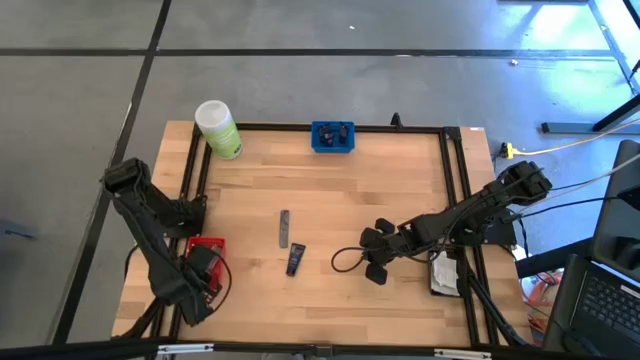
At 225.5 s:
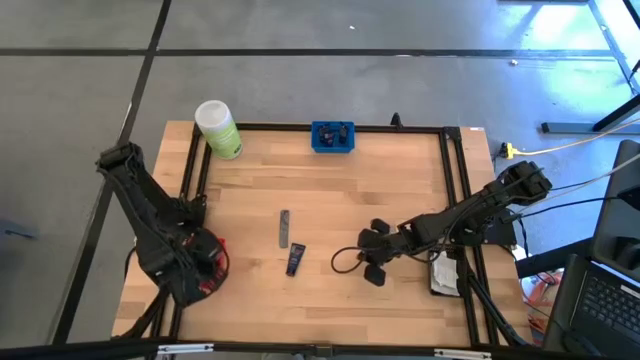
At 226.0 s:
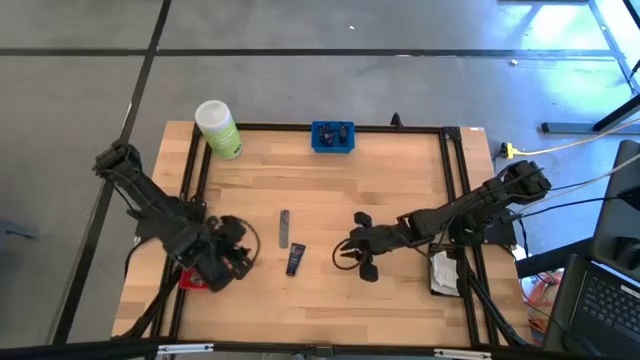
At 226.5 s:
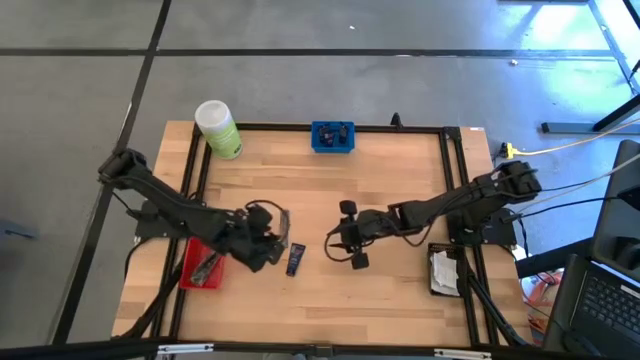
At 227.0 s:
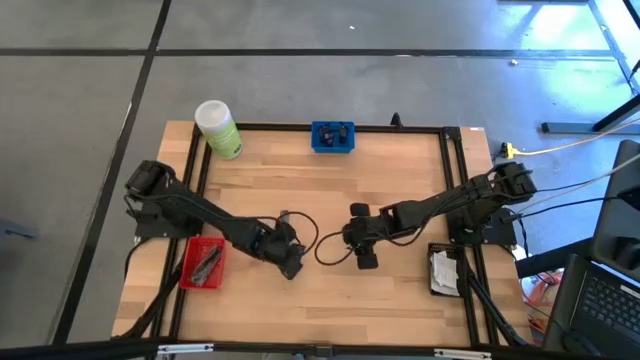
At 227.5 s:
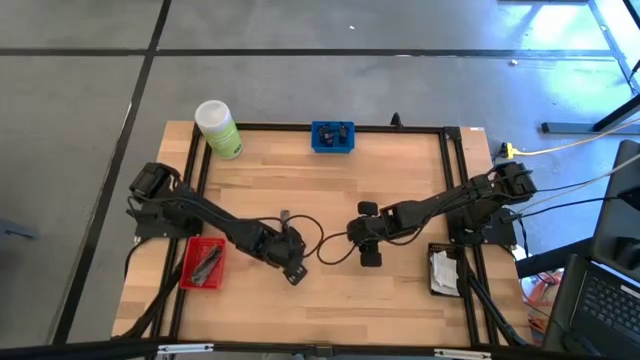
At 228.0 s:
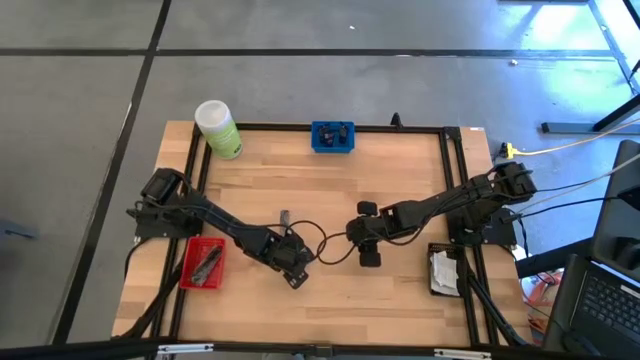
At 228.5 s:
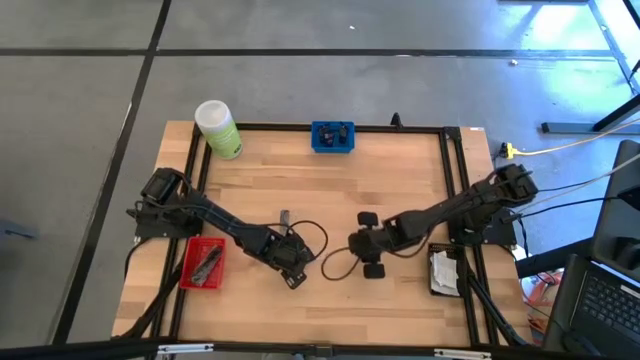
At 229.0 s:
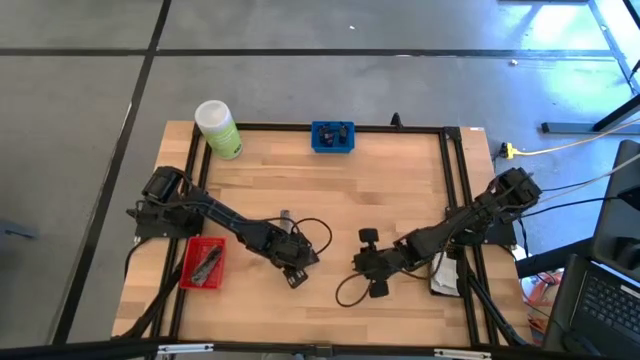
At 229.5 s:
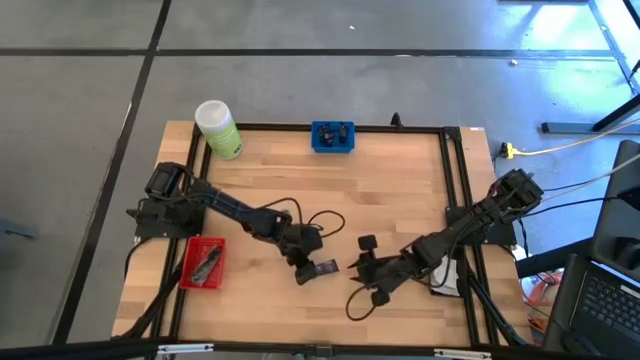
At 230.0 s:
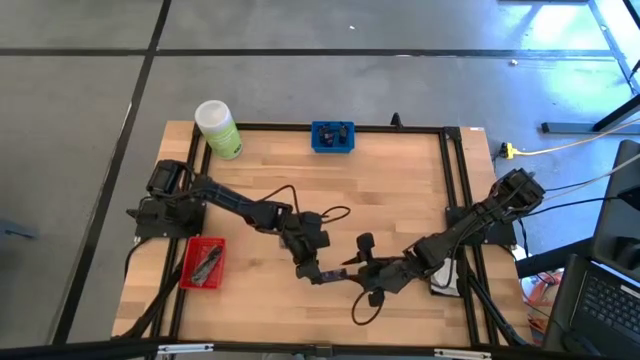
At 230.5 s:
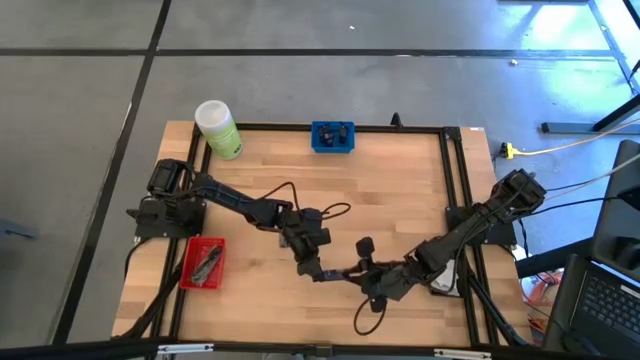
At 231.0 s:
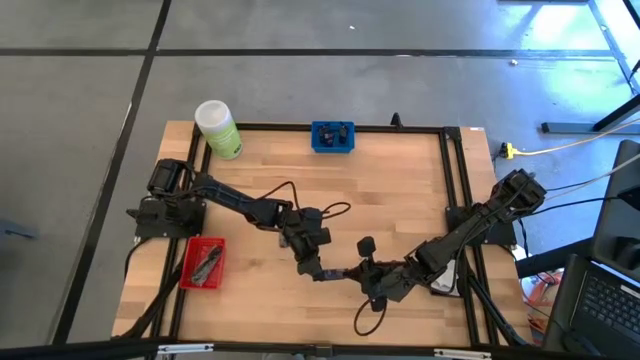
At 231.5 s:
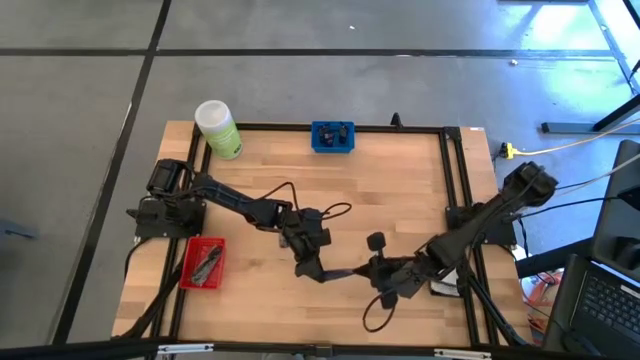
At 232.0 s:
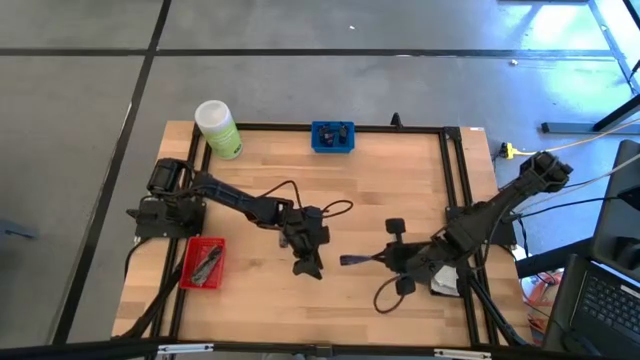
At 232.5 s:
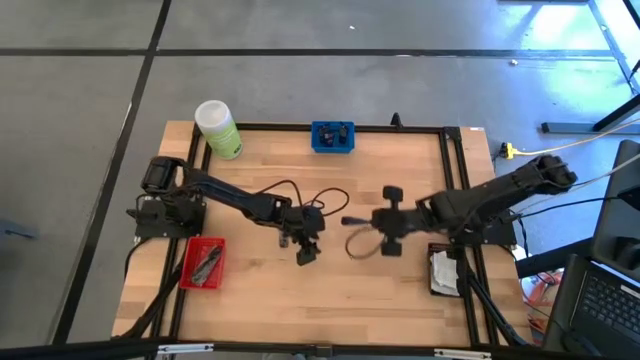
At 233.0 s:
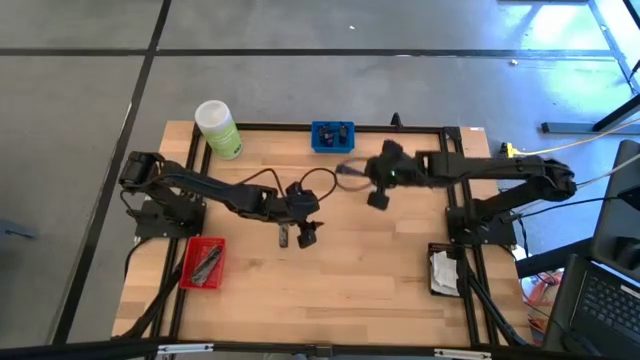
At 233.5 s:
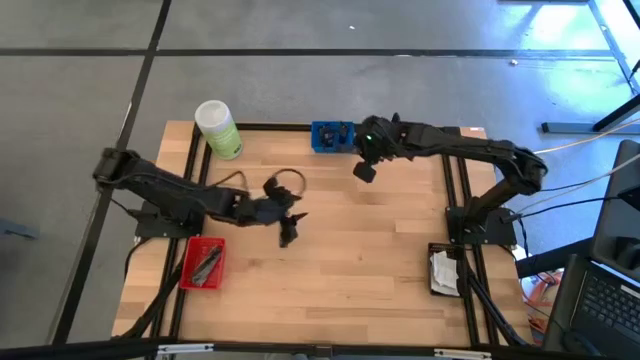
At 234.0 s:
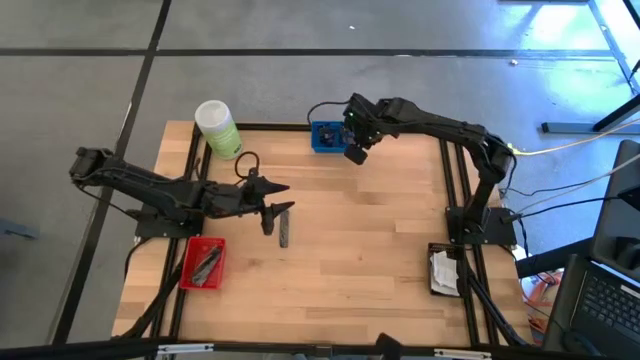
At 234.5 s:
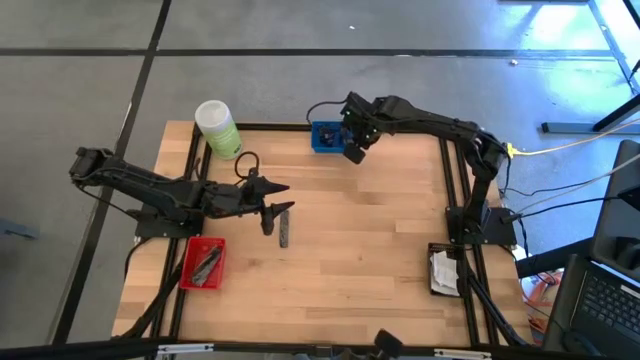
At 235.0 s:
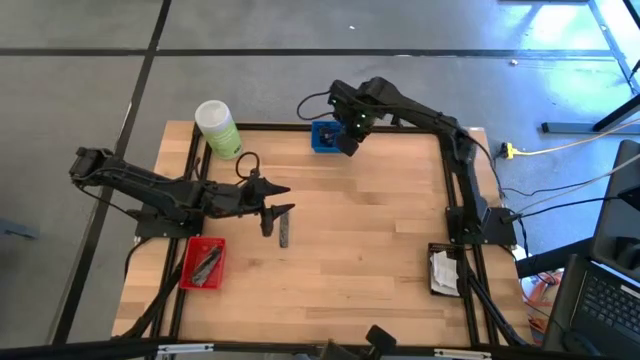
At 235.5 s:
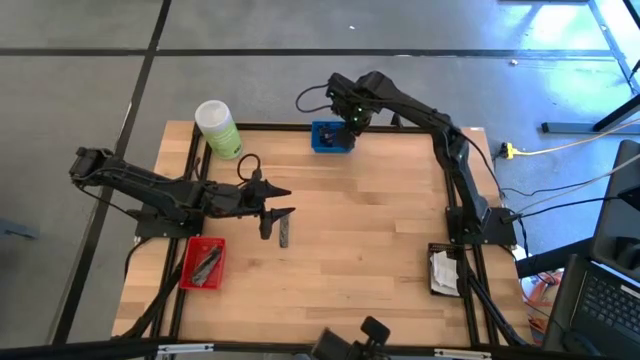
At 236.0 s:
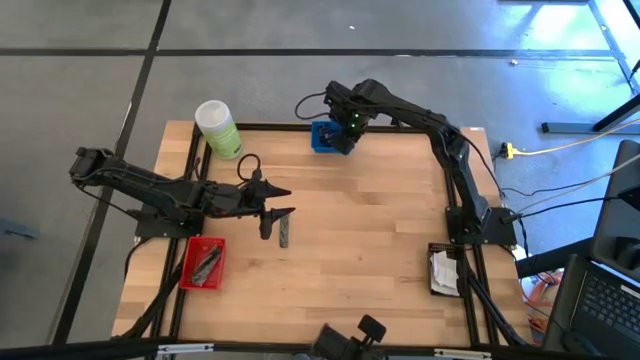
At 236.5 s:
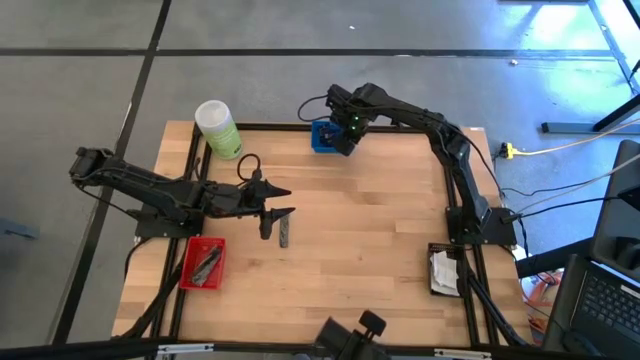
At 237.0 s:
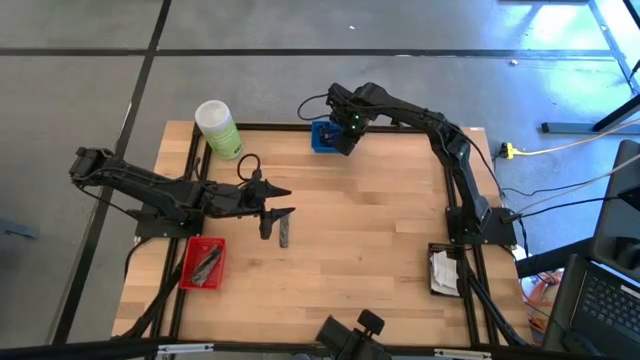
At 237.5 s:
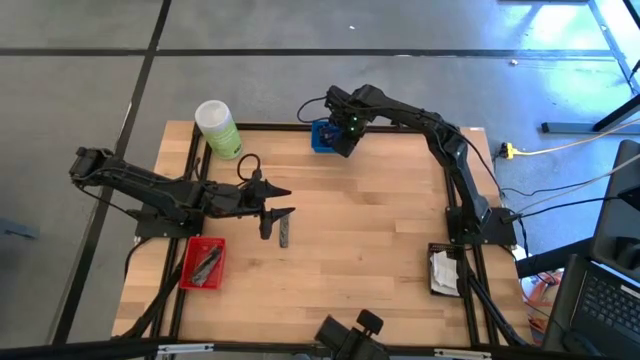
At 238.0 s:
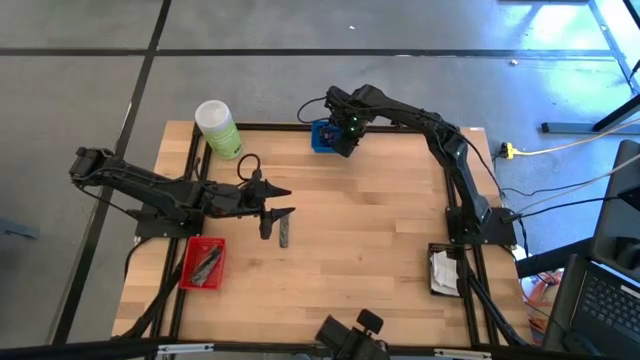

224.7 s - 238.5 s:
Task: Pick & Place Travel size toiletries
Put the dark blue shaving cream into the blue basket

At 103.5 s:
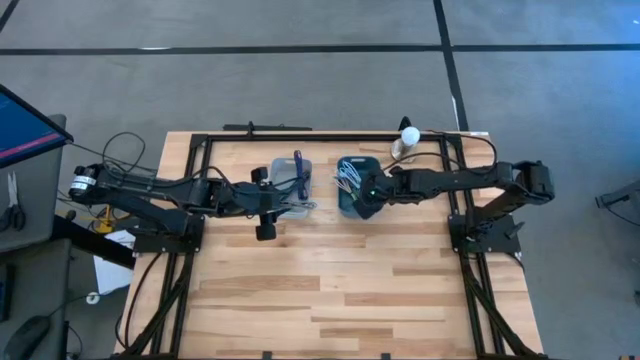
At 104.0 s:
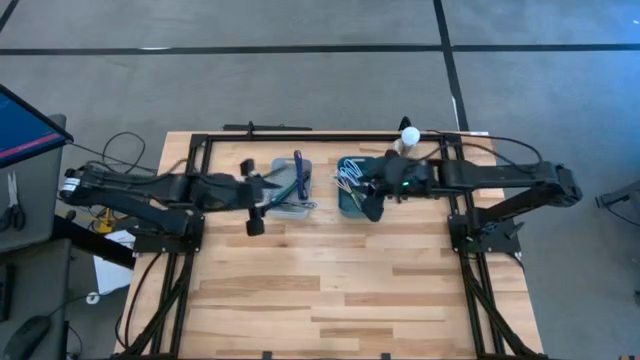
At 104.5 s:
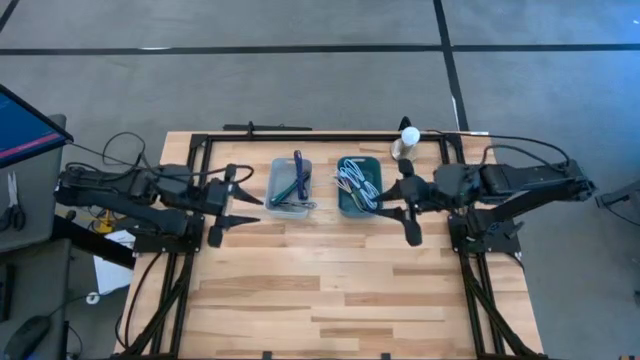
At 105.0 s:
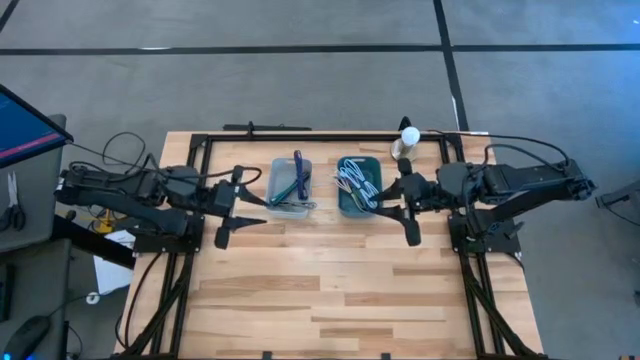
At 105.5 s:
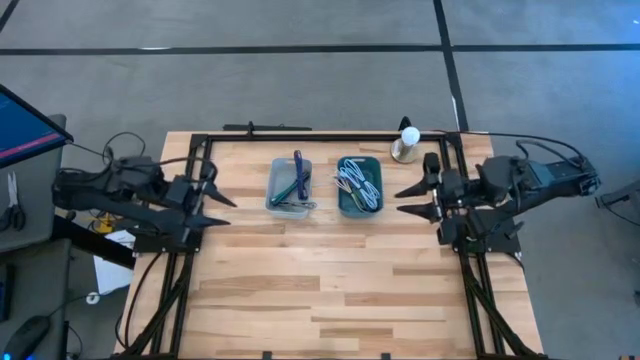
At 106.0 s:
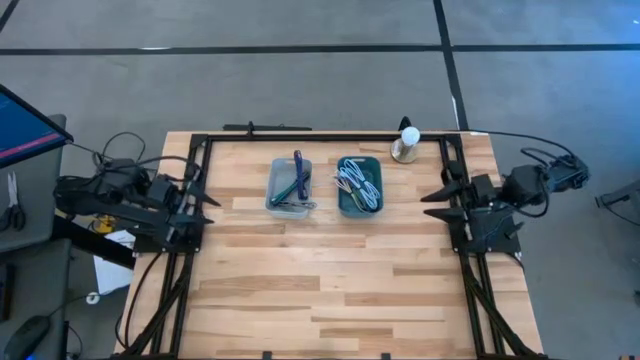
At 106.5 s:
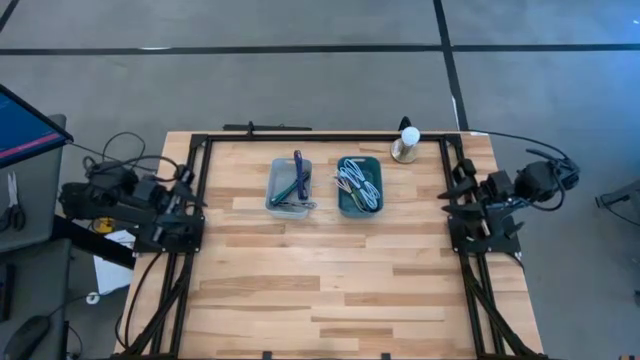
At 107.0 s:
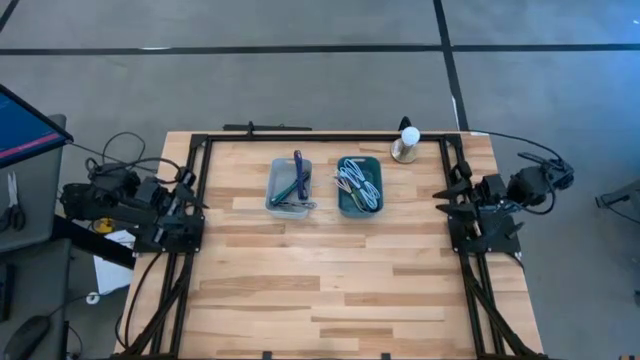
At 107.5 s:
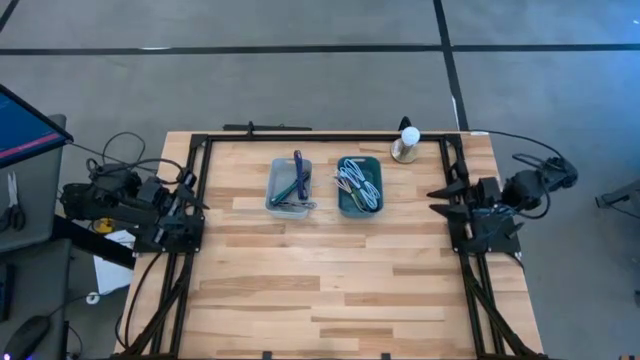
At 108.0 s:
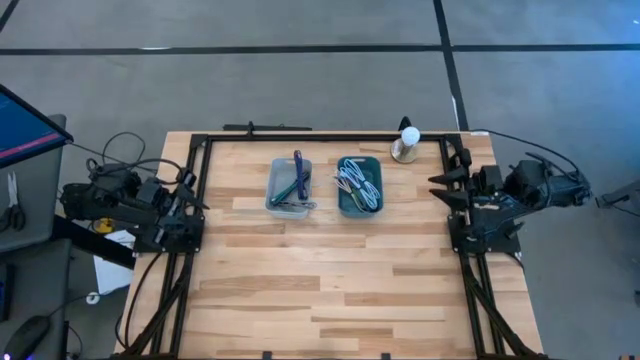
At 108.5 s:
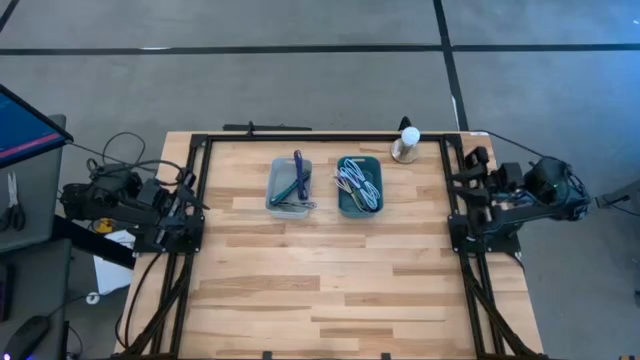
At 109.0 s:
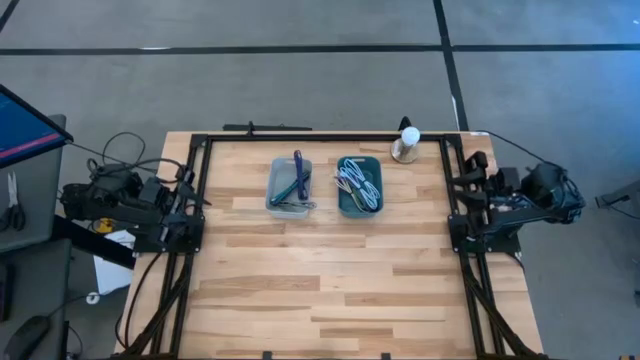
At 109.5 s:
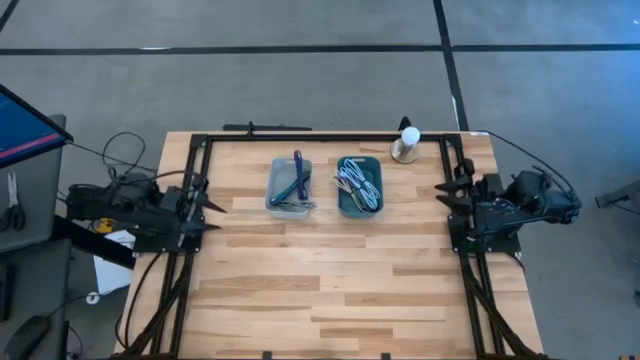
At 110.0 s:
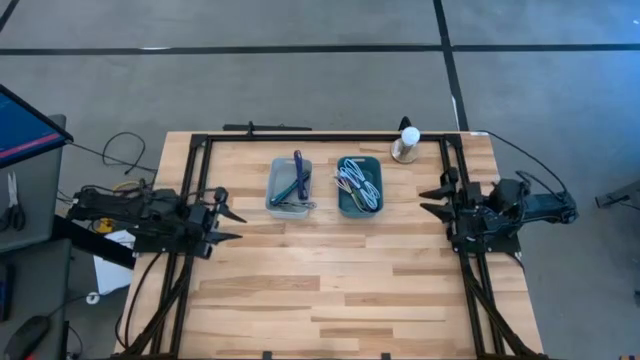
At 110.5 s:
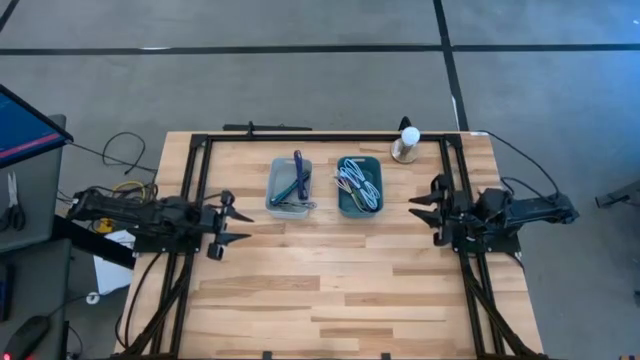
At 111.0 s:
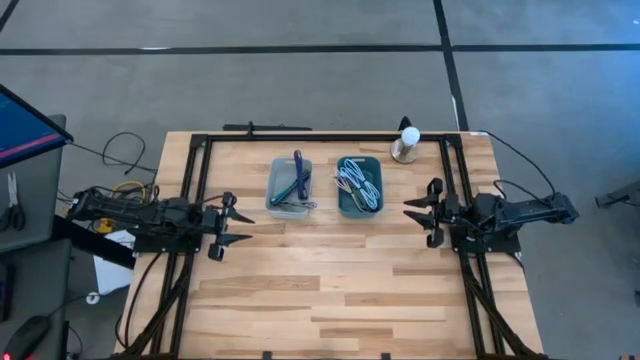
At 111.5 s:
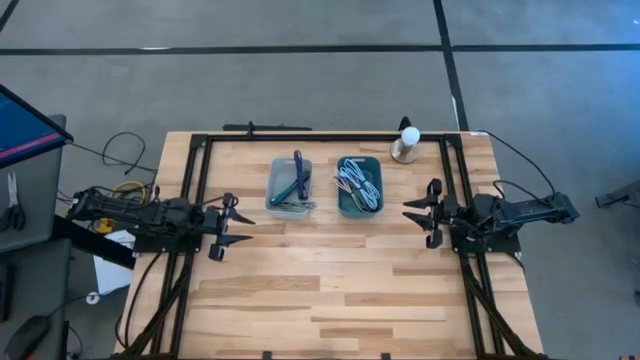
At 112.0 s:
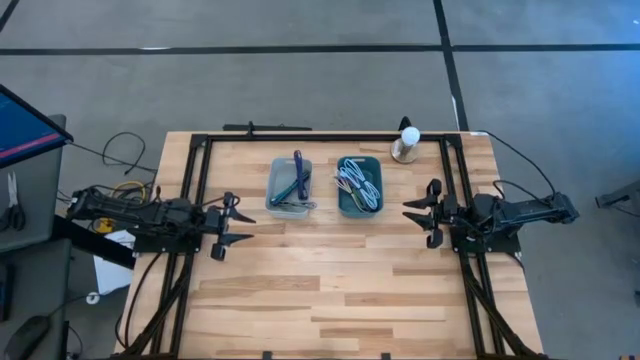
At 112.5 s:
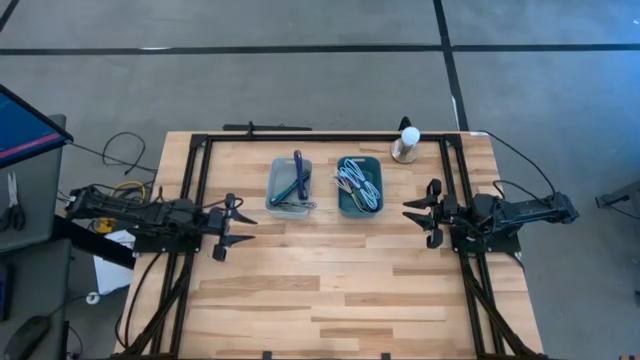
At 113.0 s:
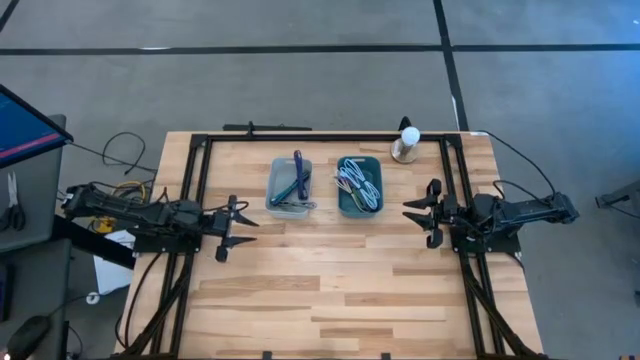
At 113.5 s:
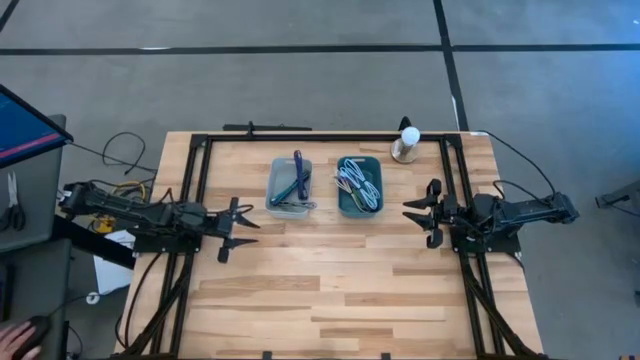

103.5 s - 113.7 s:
Task: Pick & Place USB Port
Return to Home Position
